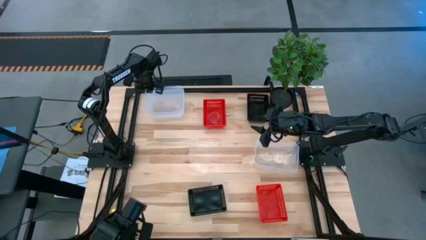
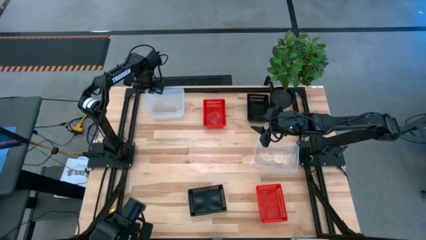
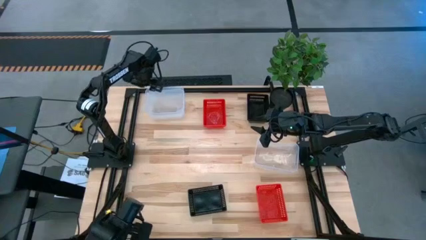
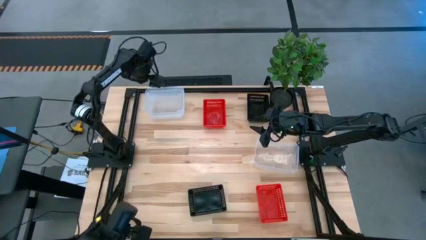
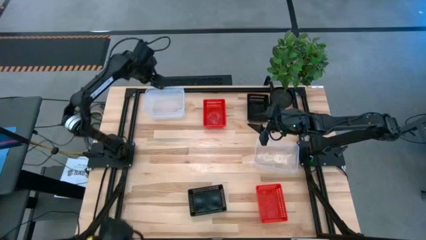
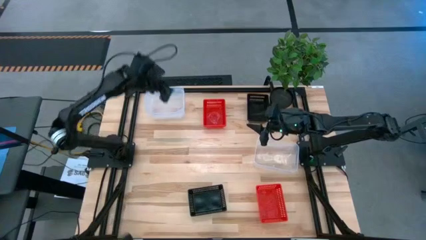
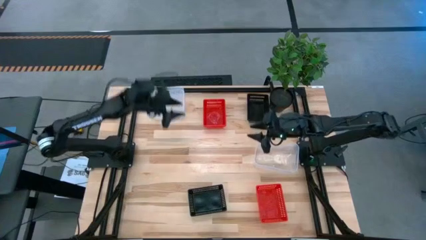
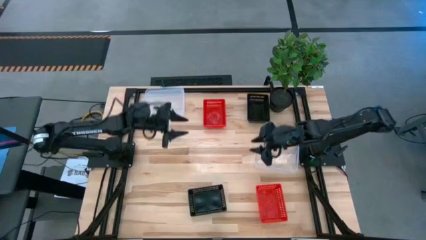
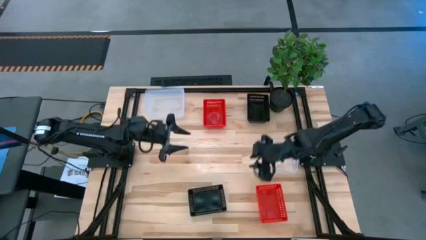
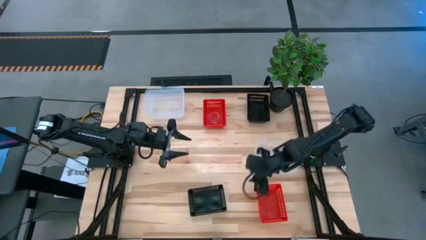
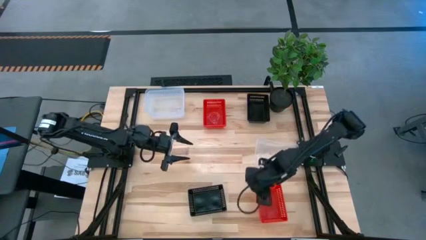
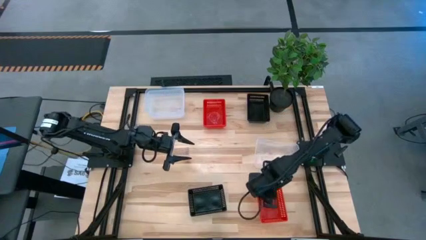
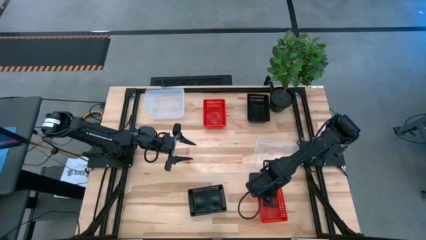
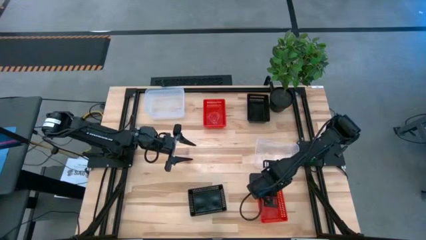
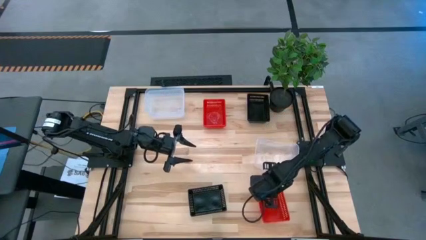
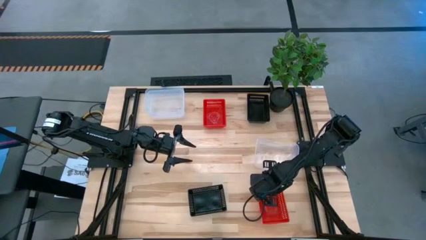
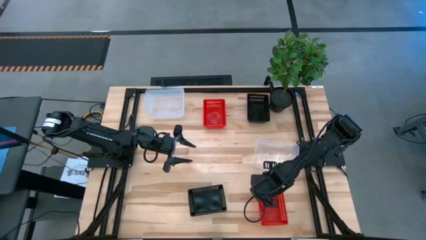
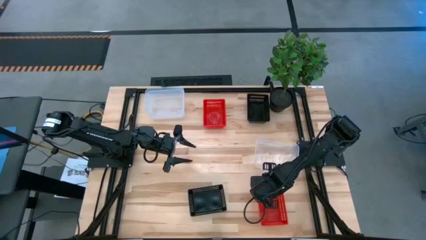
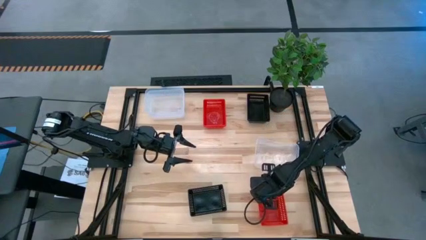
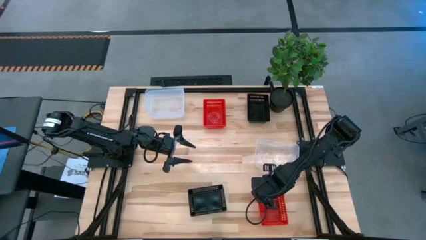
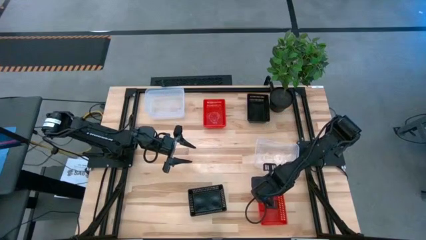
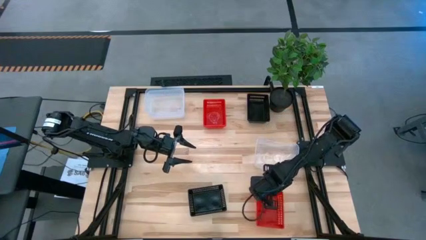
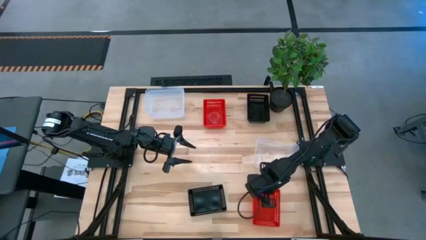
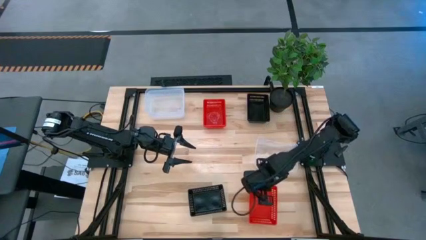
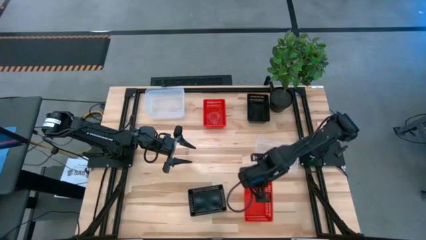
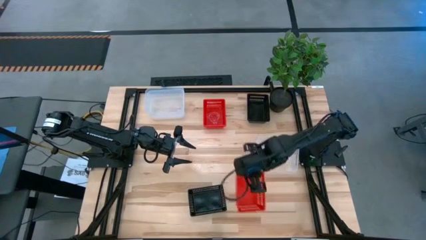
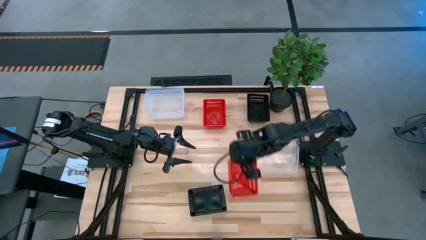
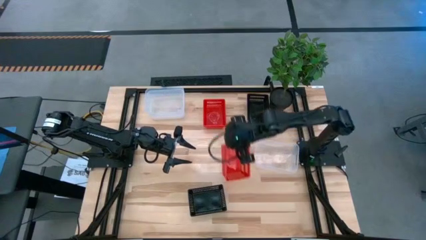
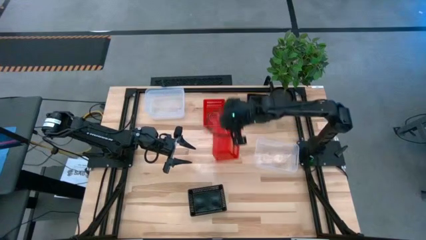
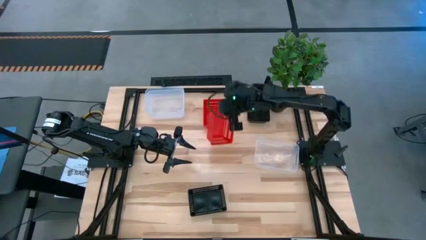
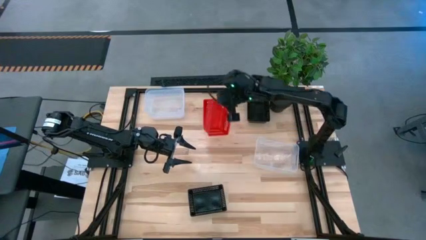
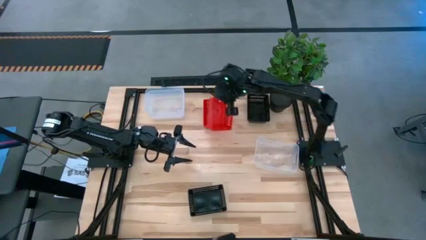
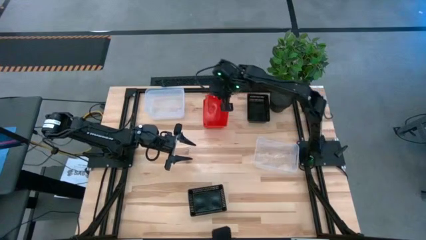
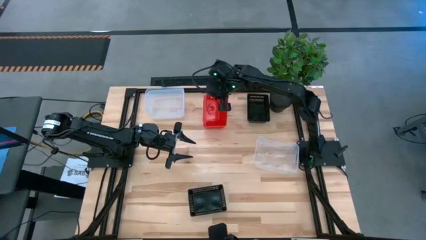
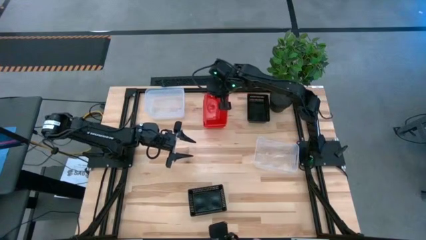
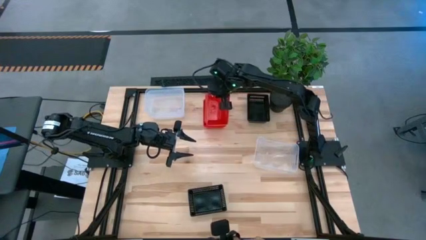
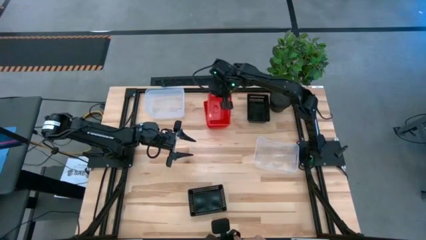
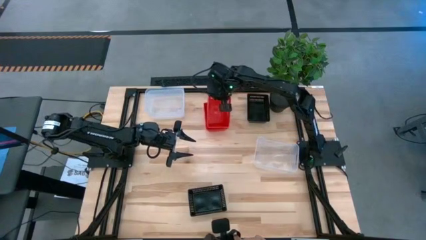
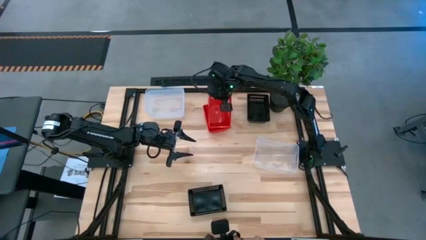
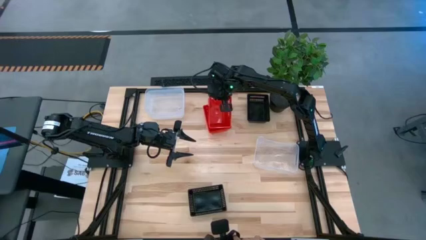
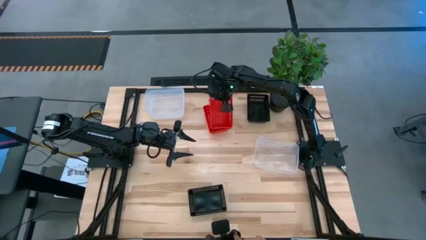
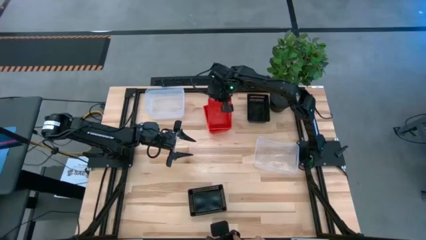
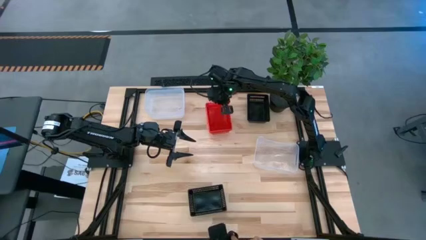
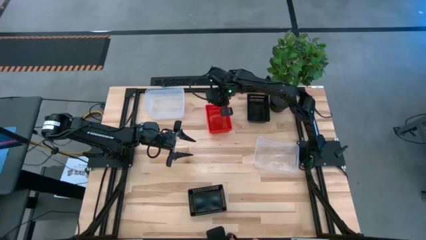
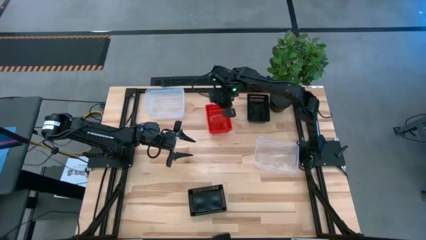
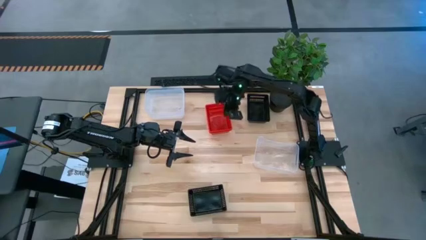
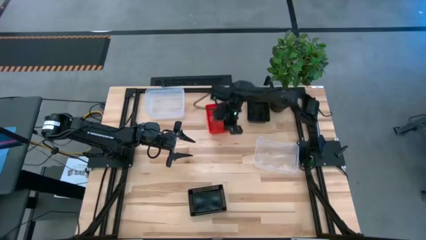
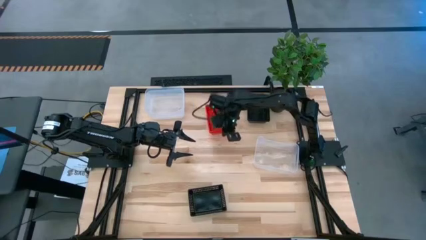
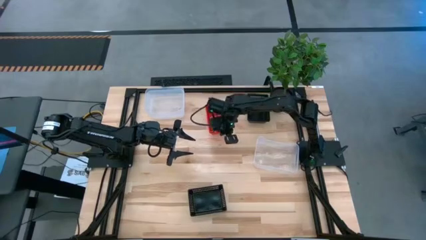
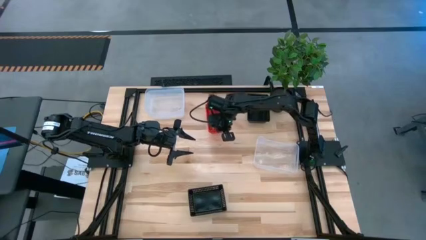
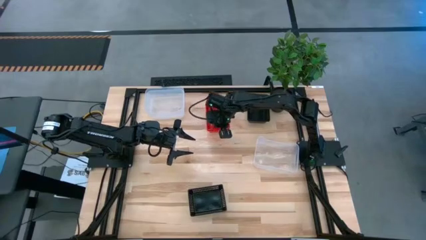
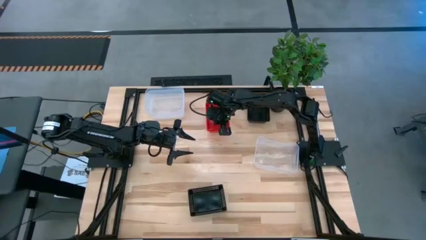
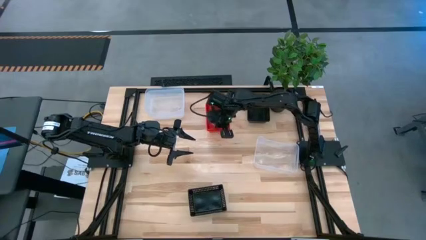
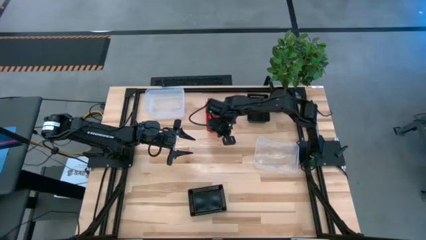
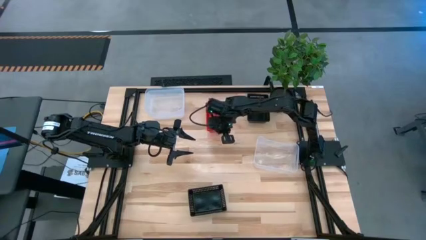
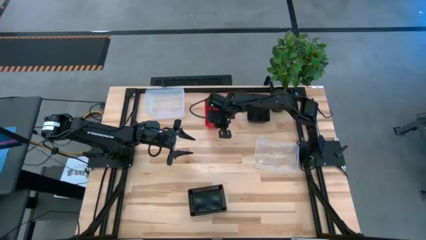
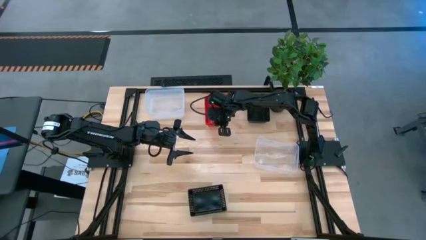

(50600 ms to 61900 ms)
Stack the bottom red basket on the top red basket
